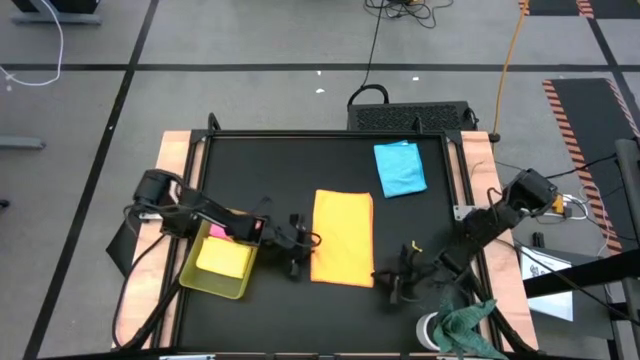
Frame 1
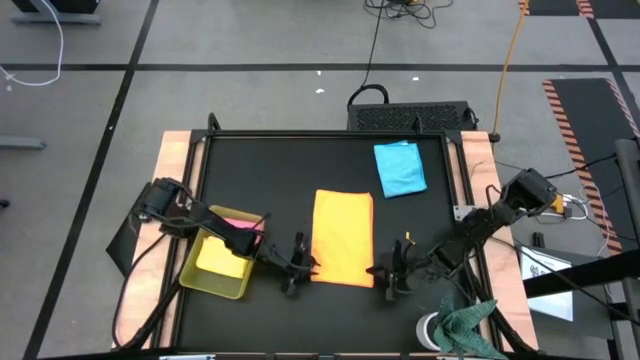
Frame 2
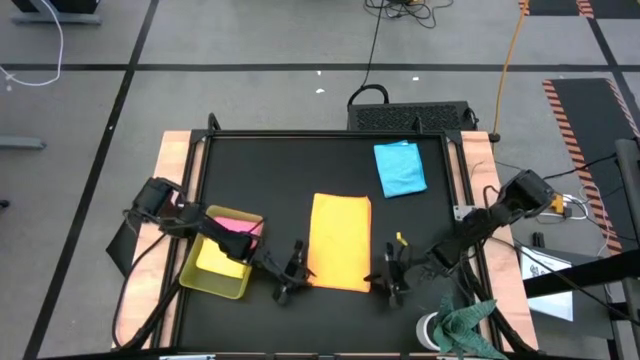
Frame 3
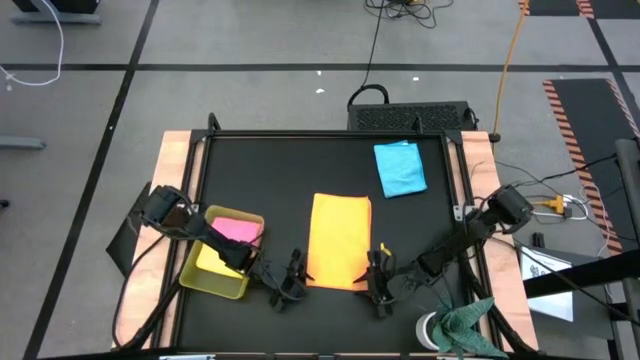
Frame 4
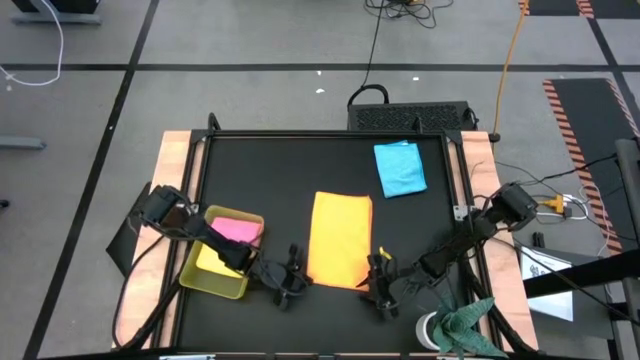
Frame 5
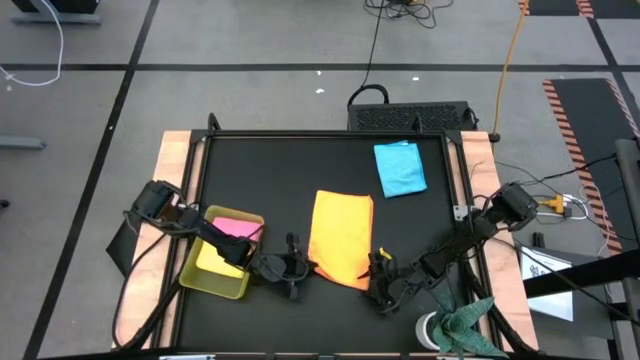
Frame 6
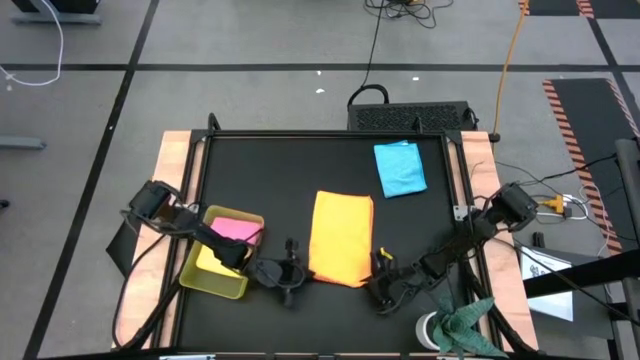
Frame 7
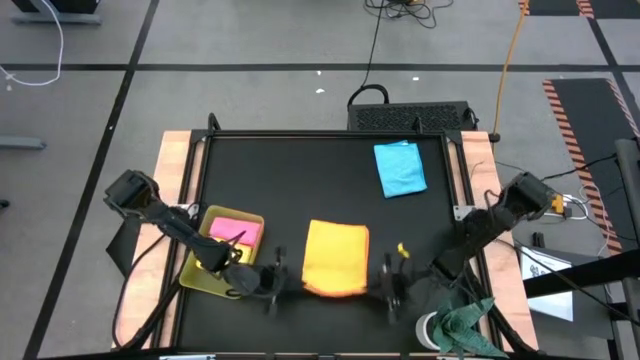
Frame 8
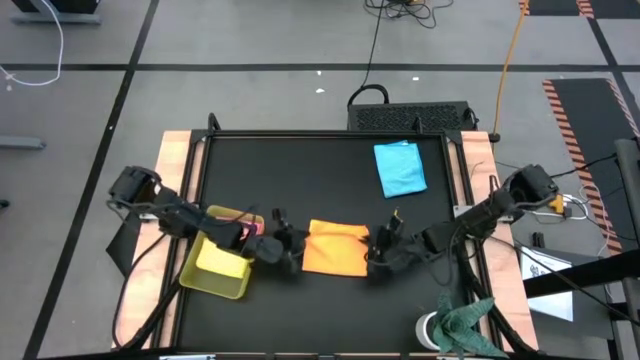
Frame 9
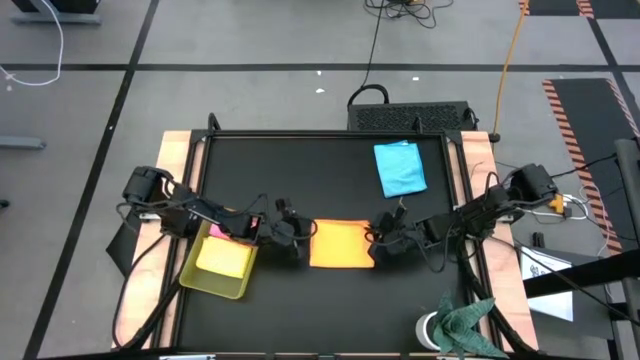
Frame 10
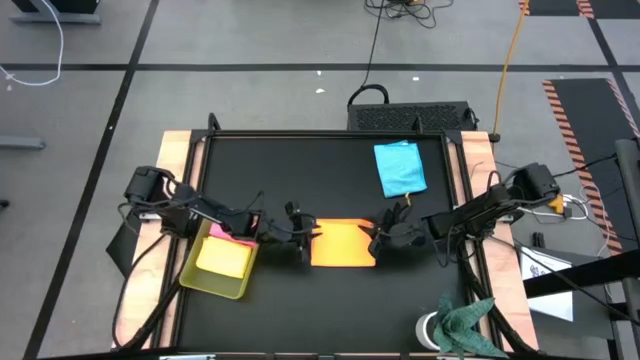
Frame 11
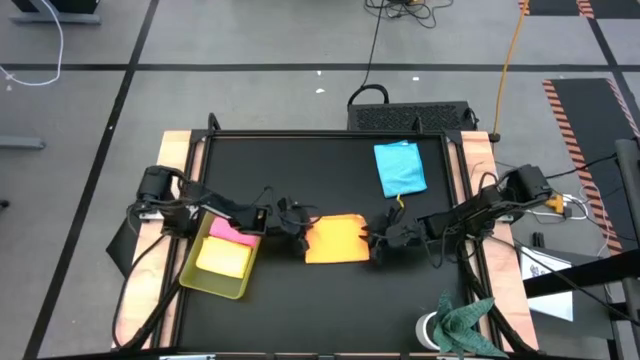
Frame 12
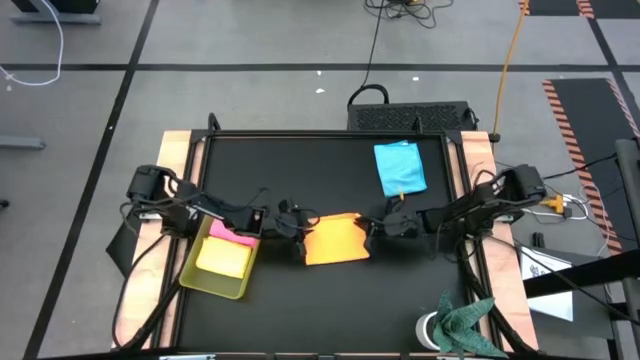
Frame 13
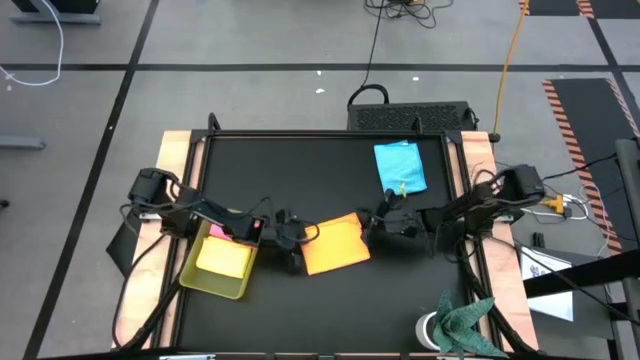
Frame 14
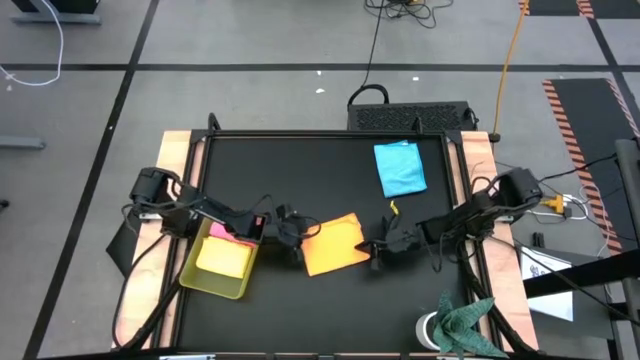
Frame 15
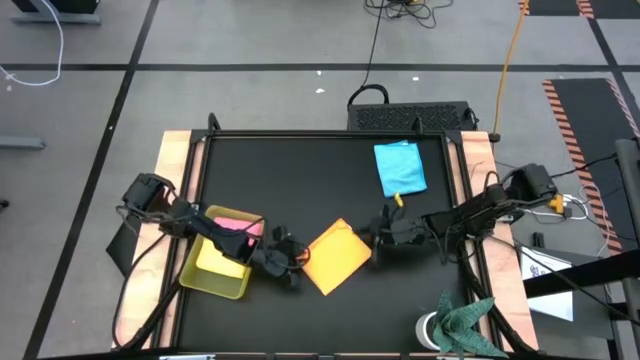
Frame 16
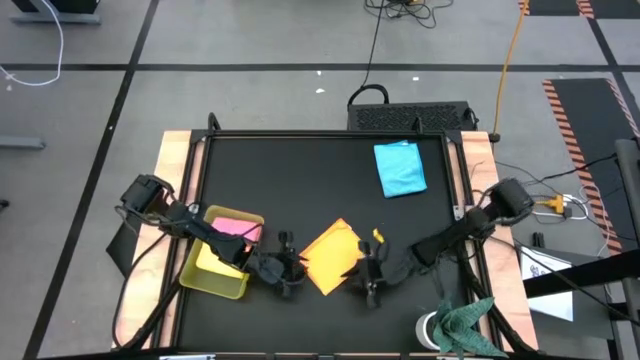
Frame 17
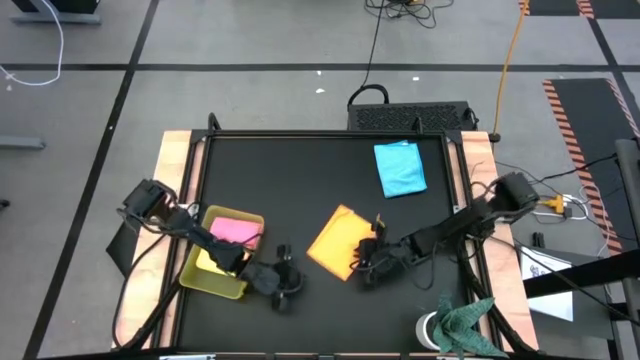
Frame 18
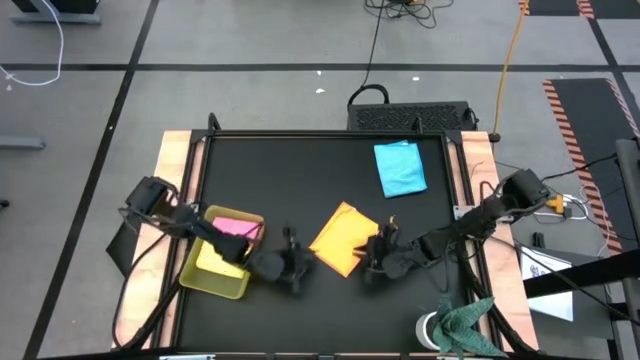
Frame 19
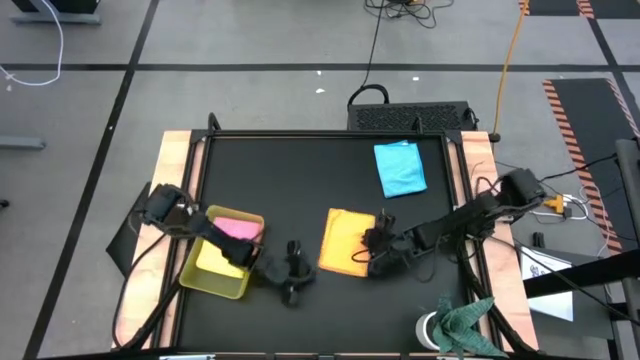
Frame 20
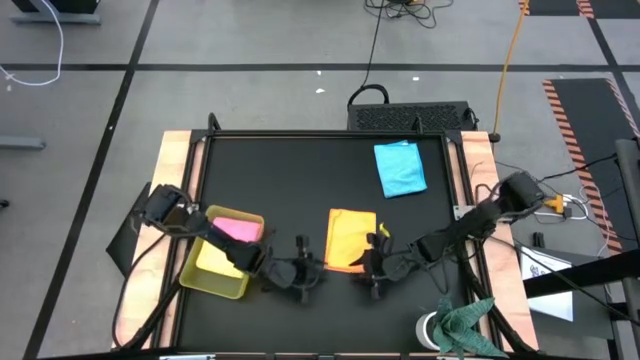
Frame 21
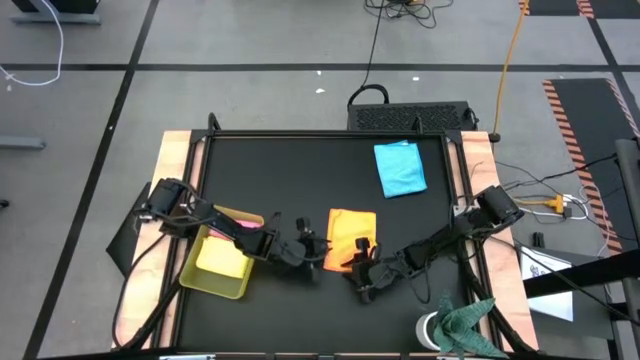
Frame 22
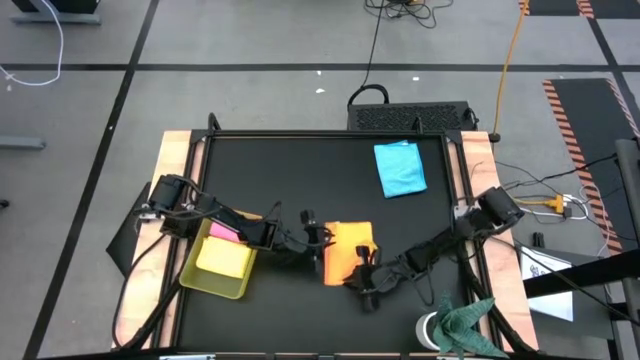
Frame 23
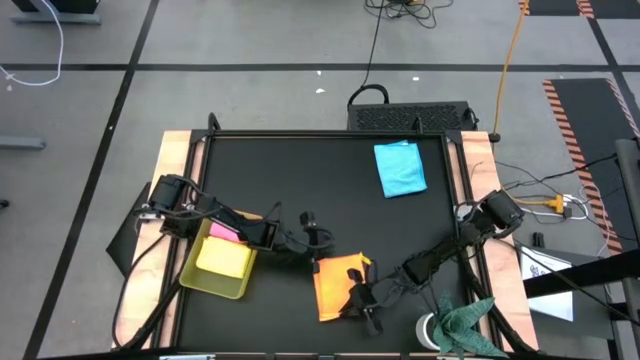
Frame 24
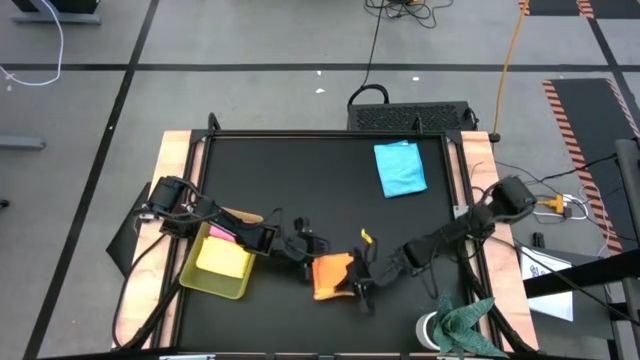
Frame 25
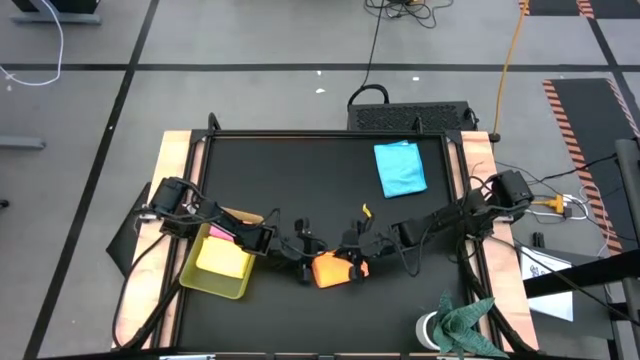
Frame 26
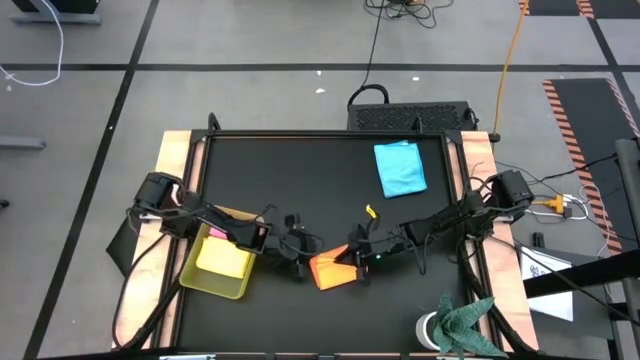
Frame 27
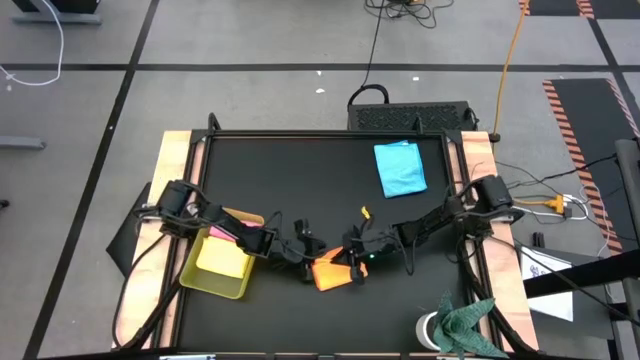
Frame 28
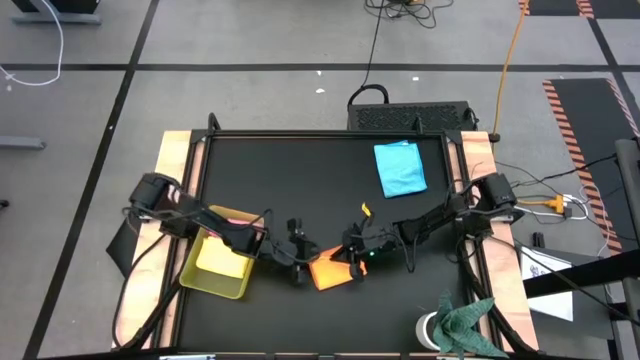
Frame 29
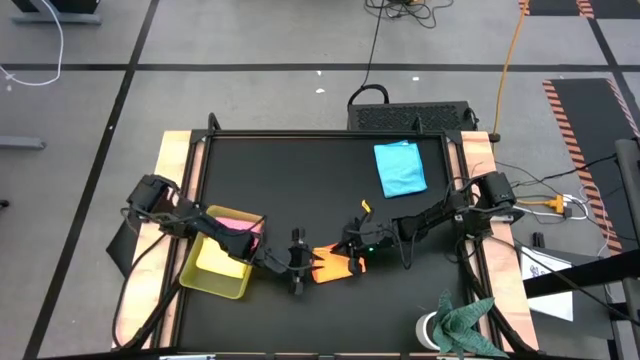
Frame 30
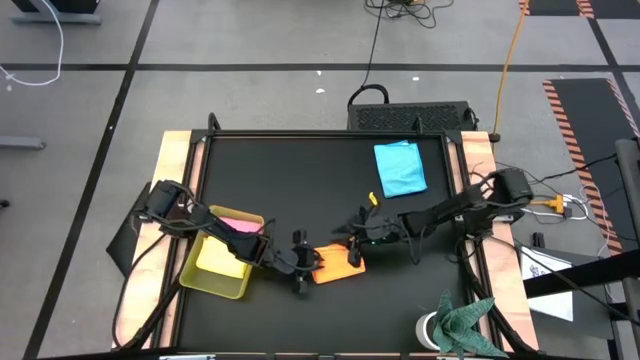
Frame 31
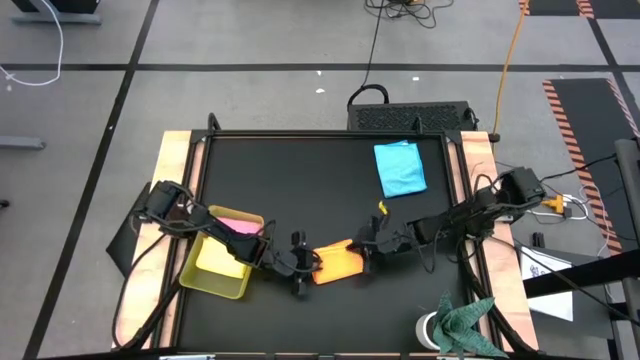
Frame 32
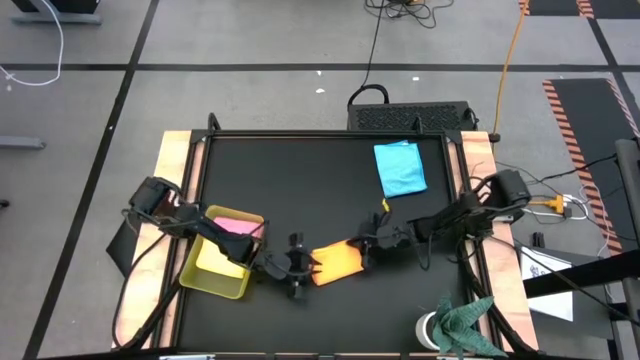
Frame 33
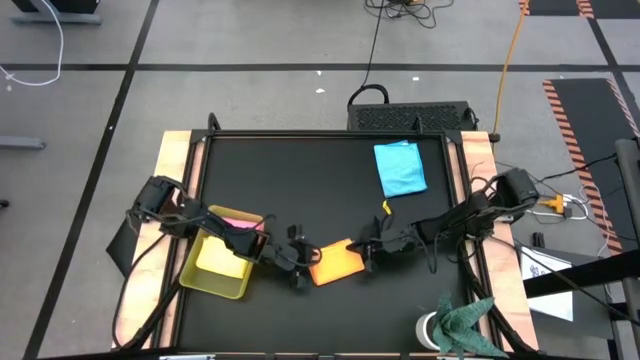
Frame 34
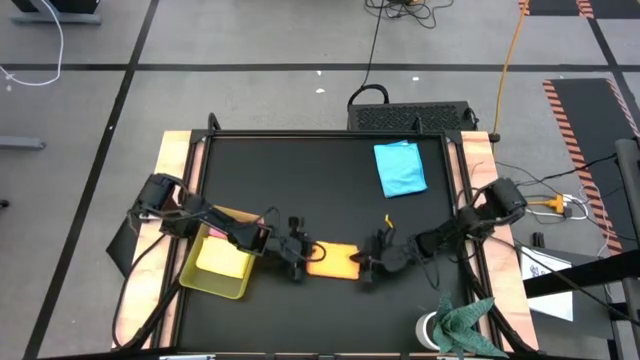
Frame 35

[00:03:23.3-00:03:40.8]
Task: Fold microfiber towels
Fold the orange microfiber towel

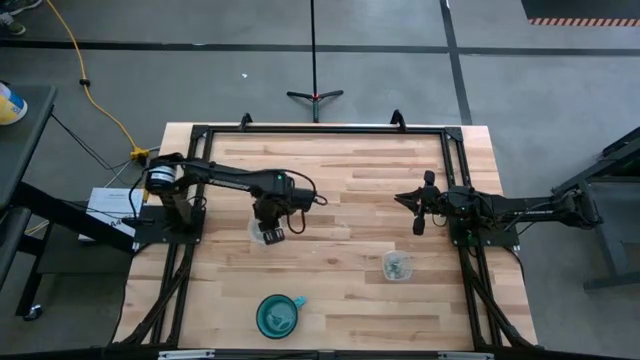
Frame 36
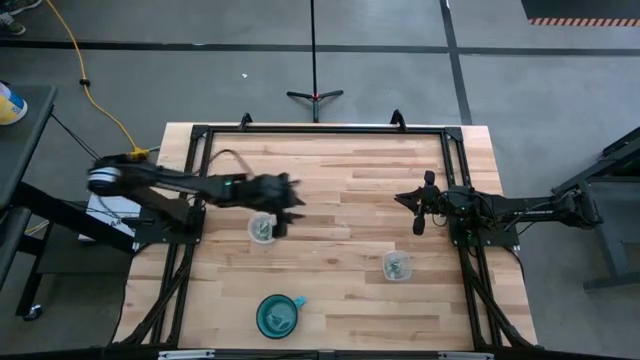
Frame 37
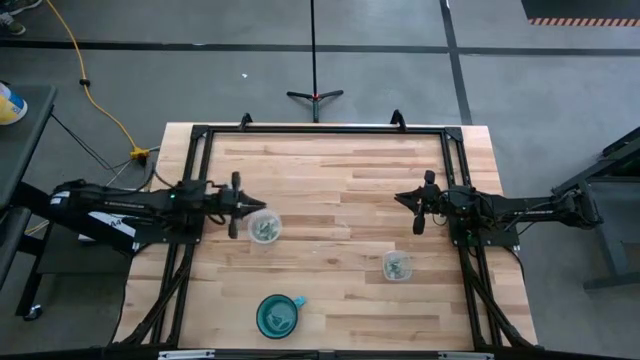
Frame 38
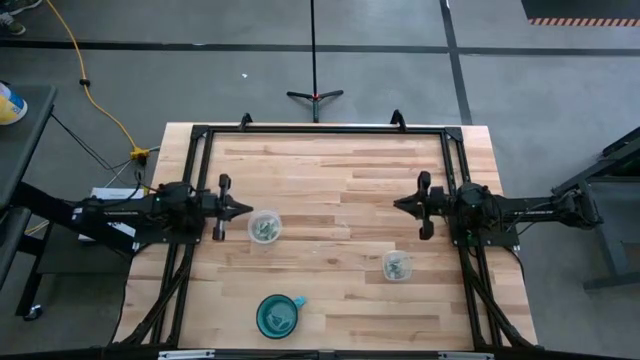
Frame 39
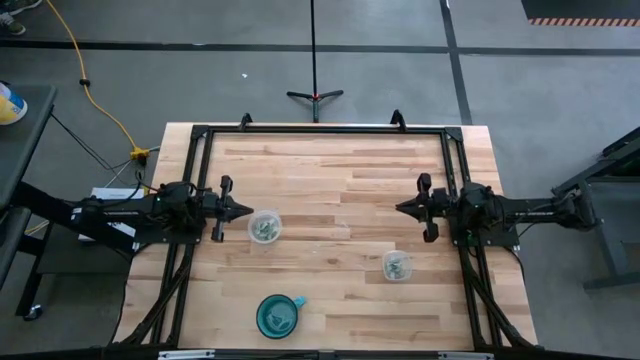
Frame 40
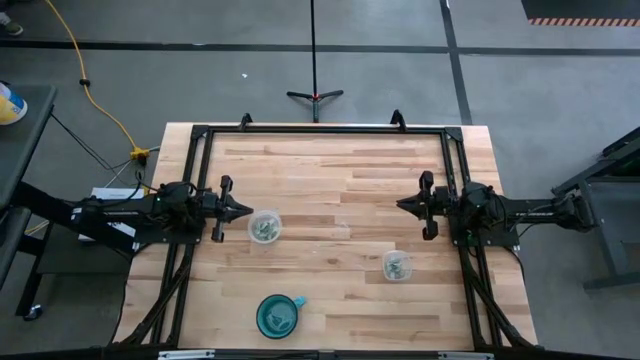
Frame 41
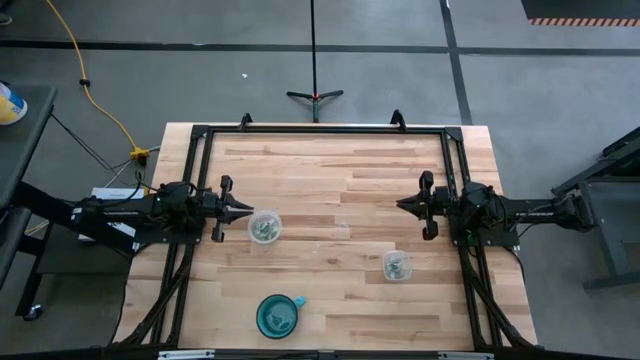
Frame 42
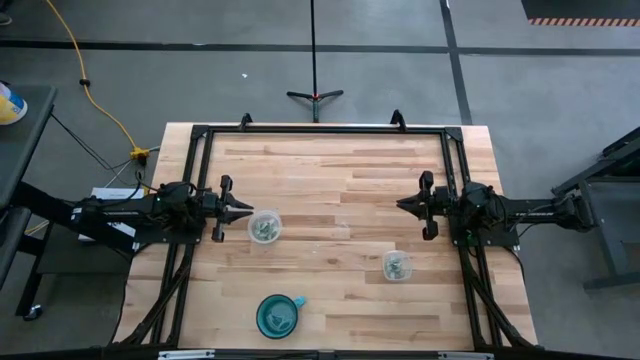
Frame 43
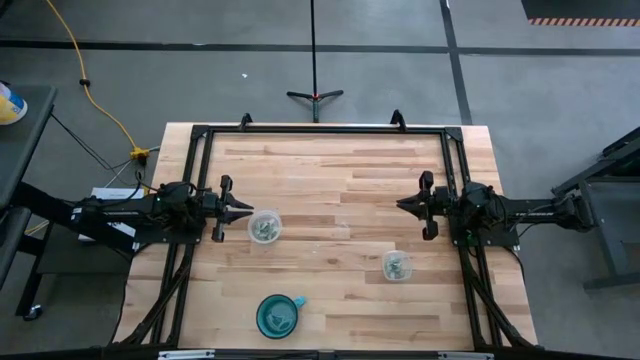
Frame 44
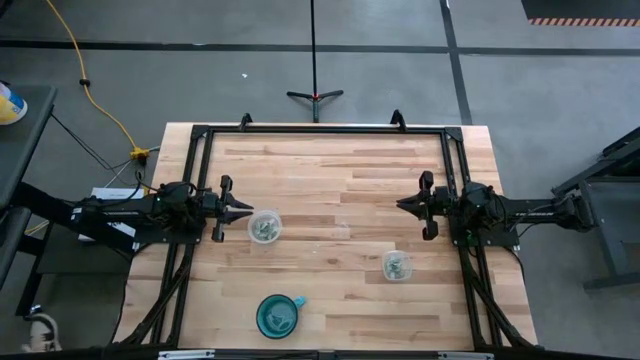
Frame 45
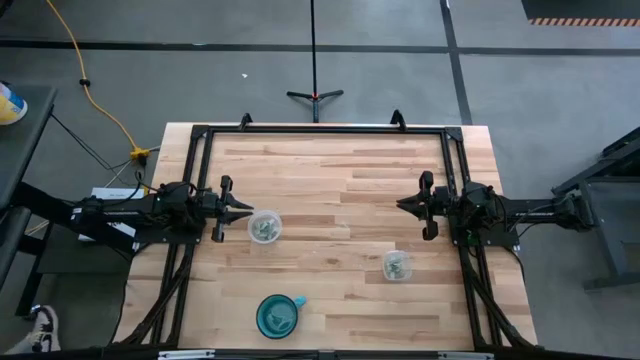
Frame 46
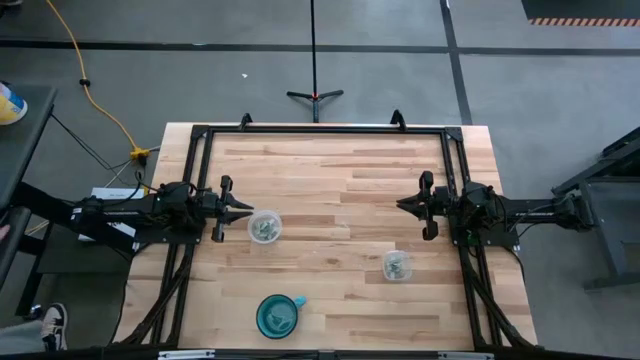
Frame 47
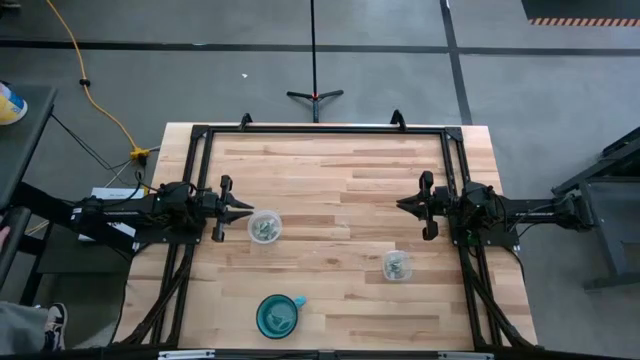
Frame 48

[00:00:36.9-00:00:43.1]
Task: Sort candy
Return to Home Position
